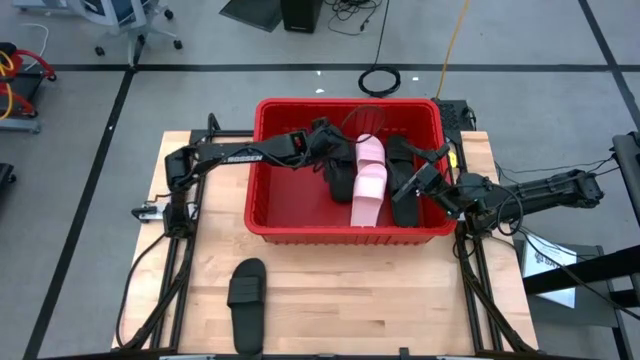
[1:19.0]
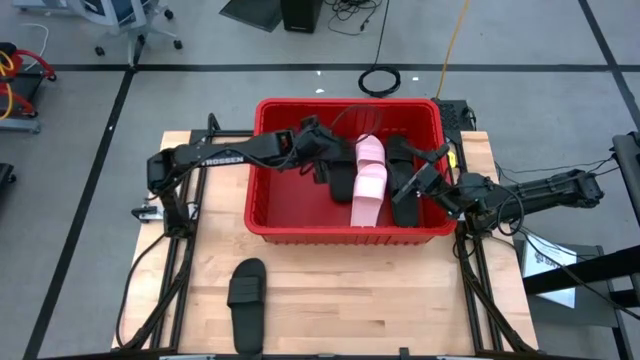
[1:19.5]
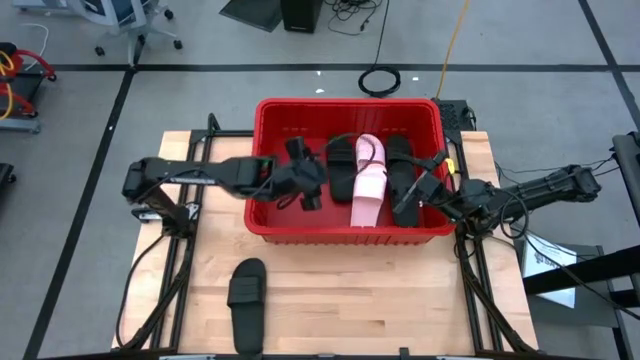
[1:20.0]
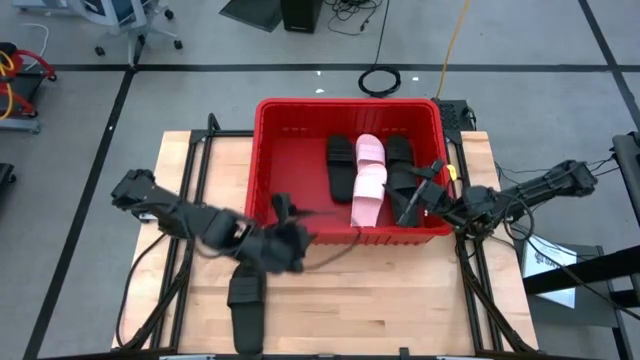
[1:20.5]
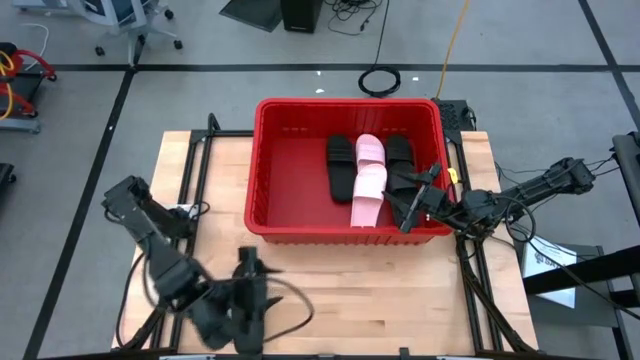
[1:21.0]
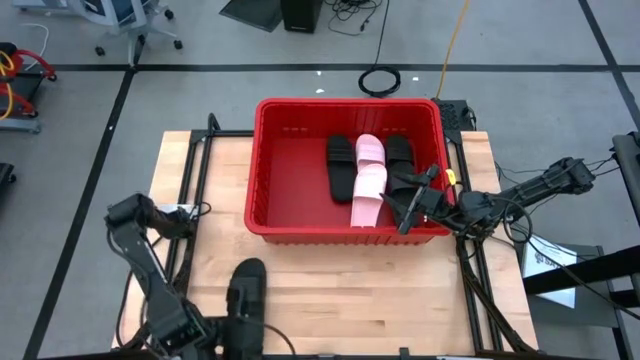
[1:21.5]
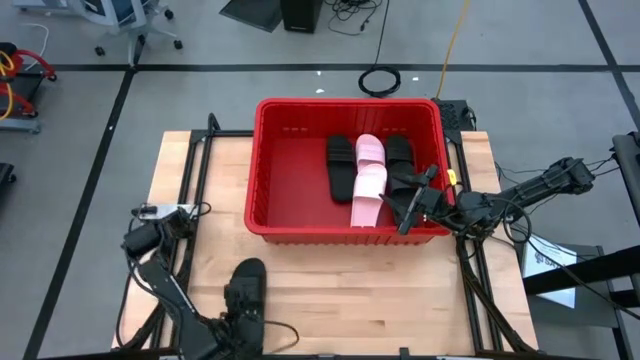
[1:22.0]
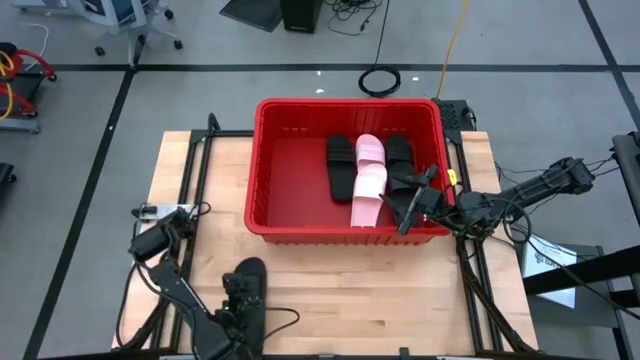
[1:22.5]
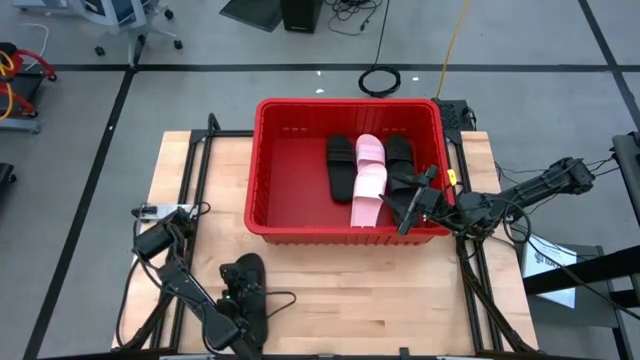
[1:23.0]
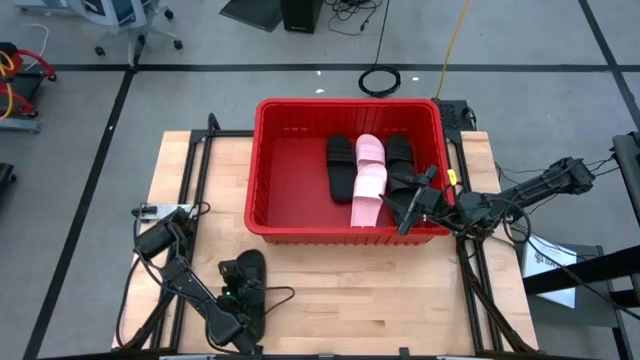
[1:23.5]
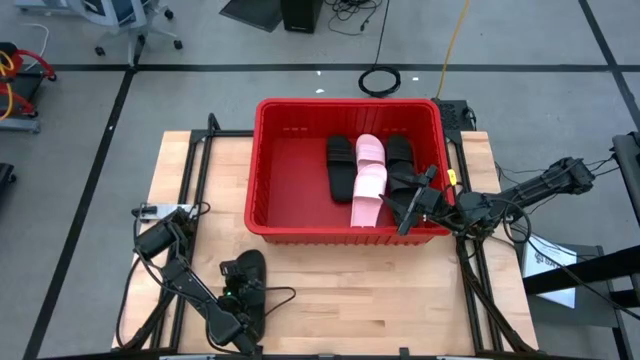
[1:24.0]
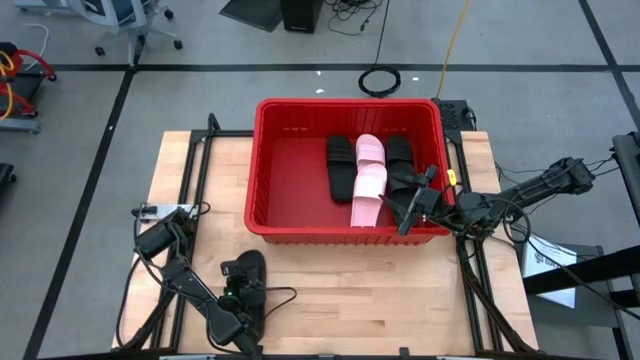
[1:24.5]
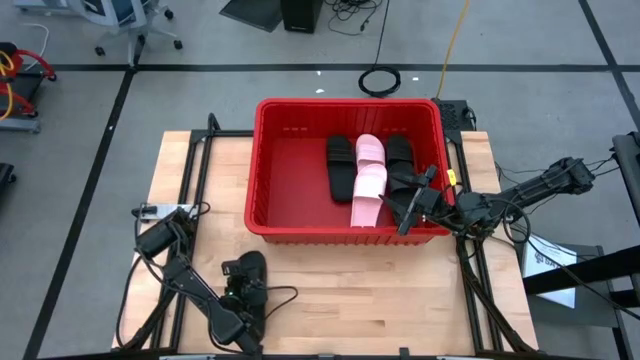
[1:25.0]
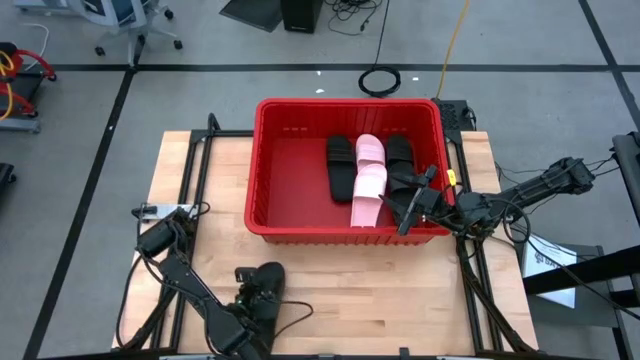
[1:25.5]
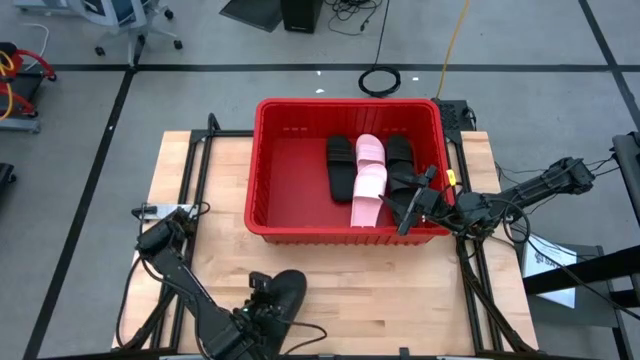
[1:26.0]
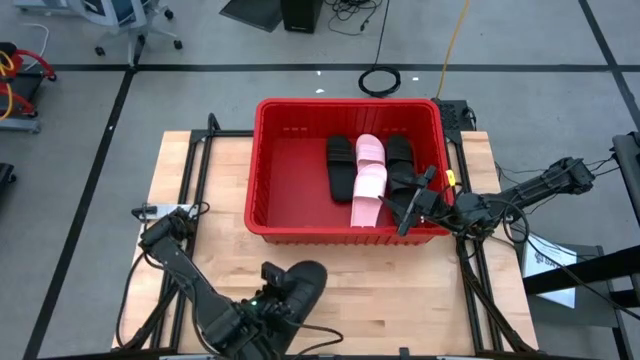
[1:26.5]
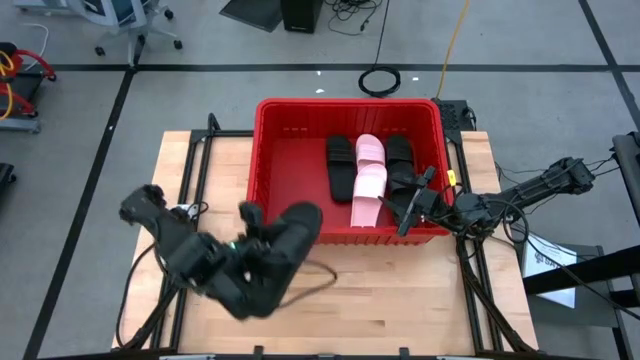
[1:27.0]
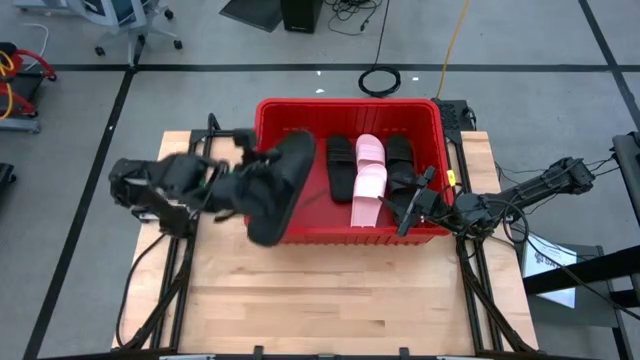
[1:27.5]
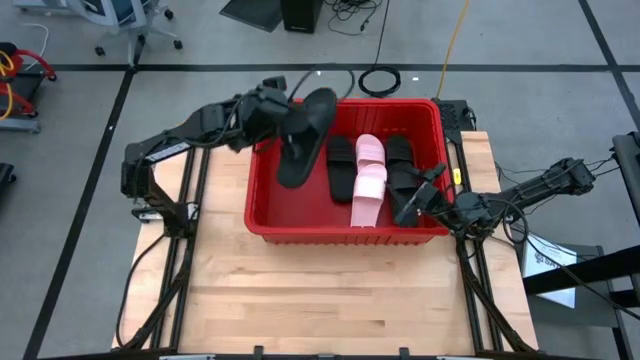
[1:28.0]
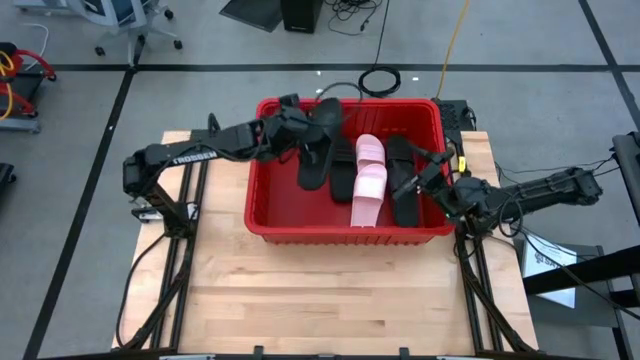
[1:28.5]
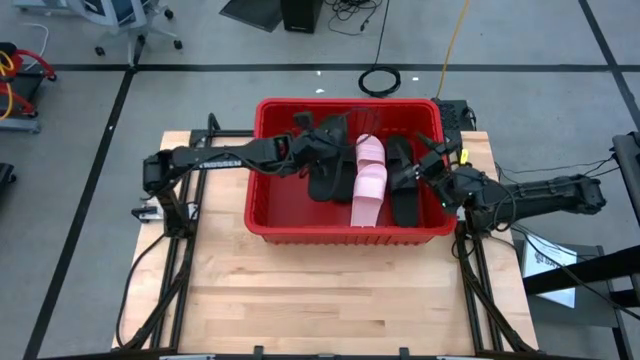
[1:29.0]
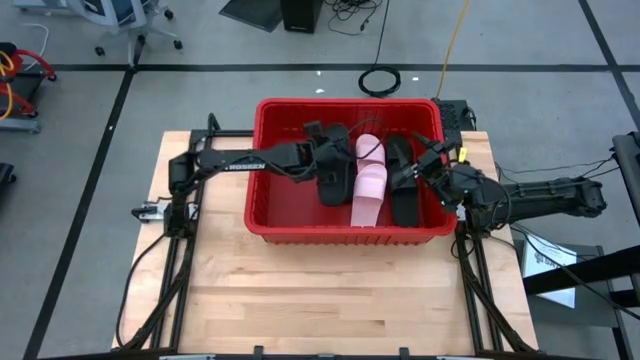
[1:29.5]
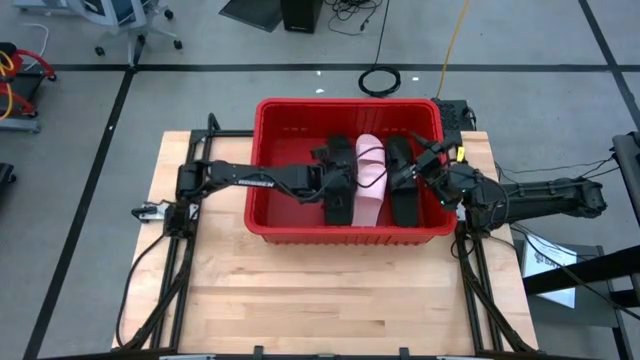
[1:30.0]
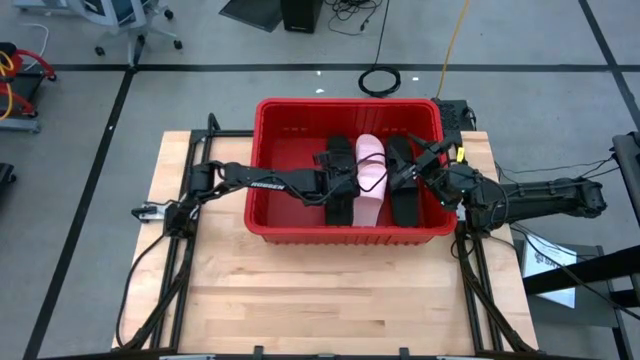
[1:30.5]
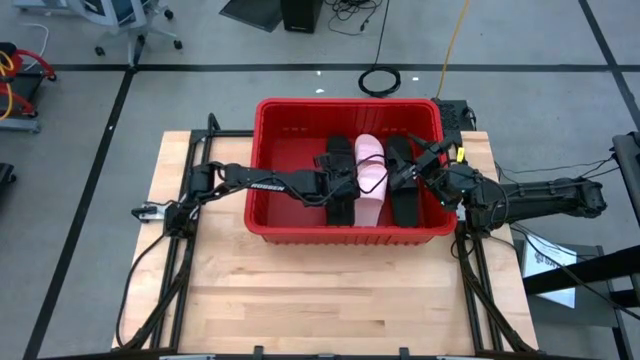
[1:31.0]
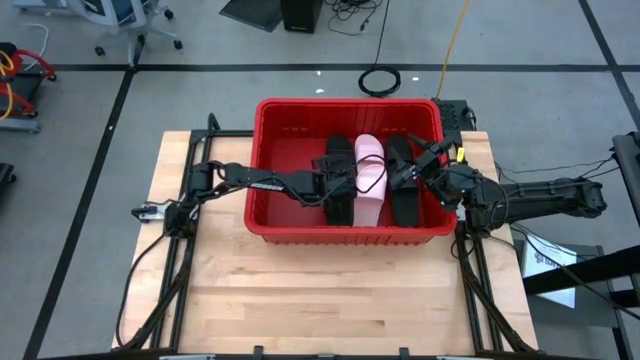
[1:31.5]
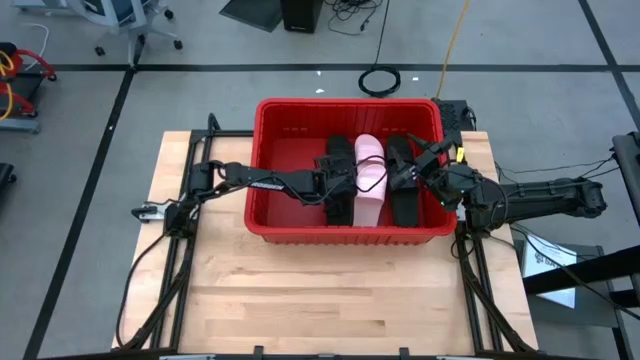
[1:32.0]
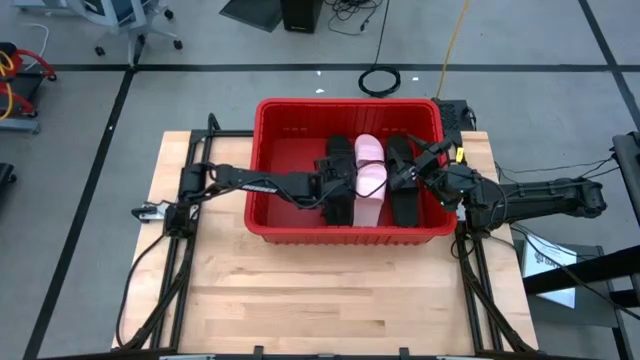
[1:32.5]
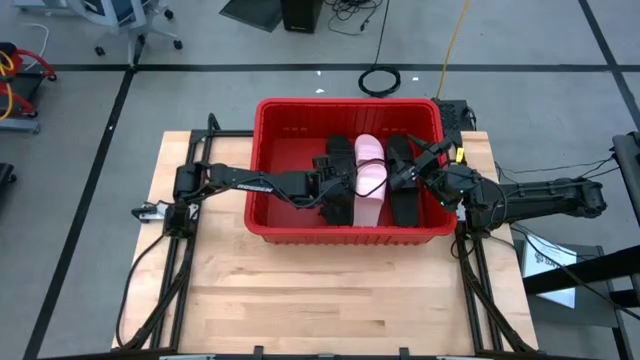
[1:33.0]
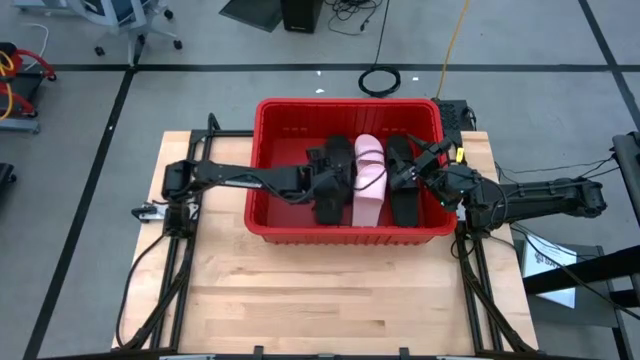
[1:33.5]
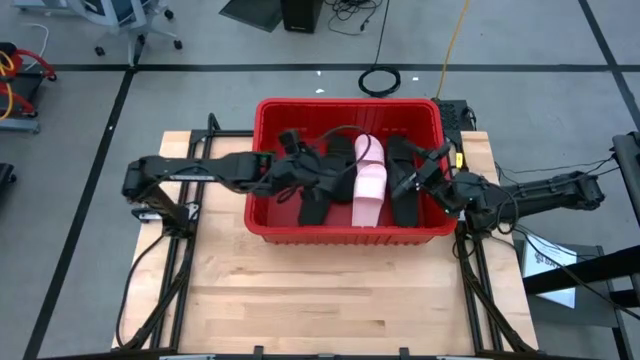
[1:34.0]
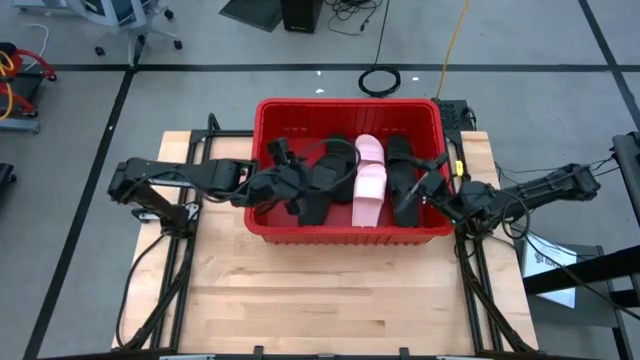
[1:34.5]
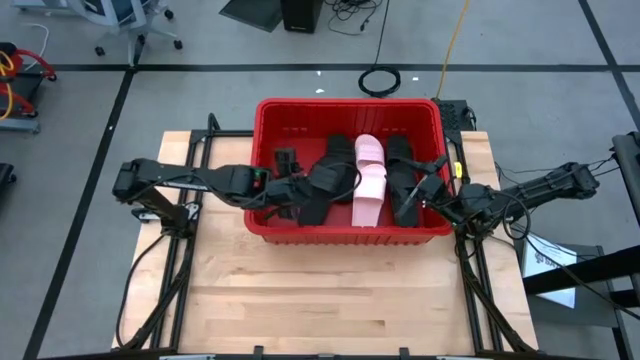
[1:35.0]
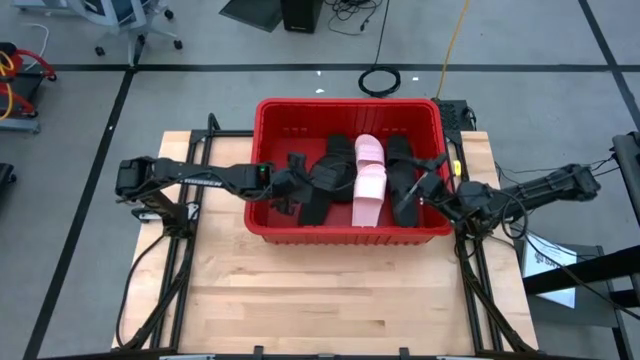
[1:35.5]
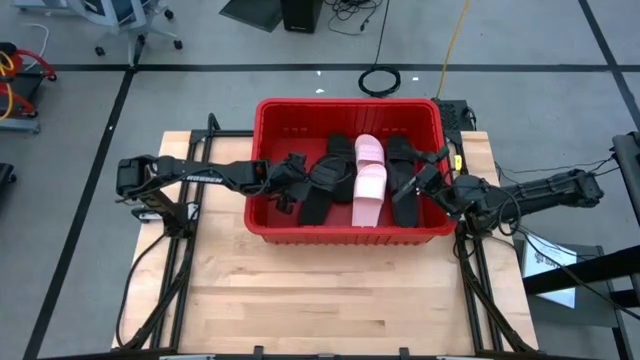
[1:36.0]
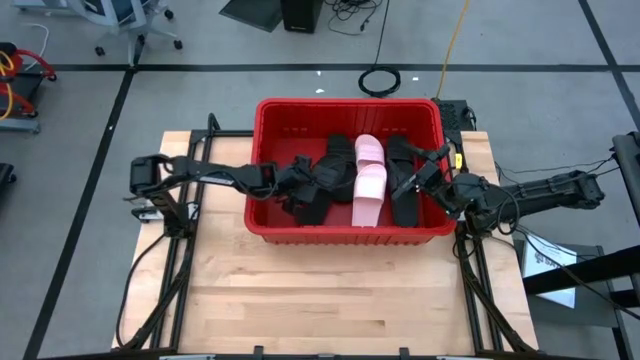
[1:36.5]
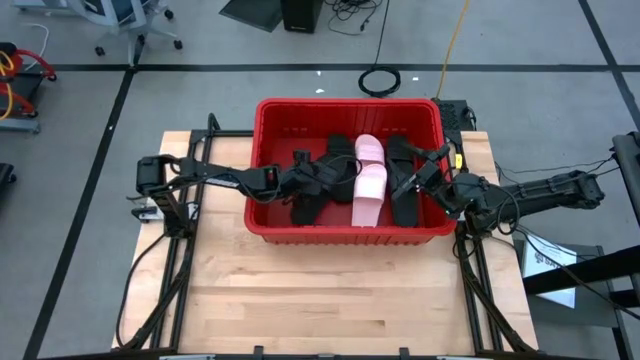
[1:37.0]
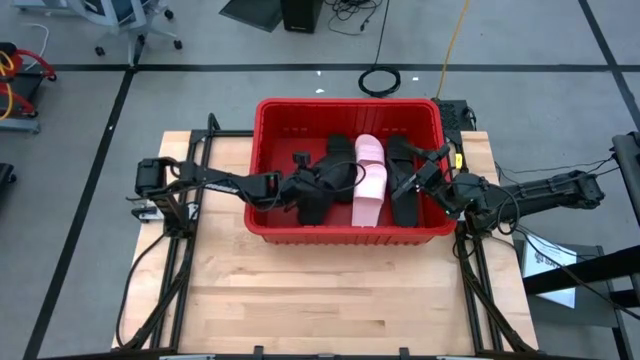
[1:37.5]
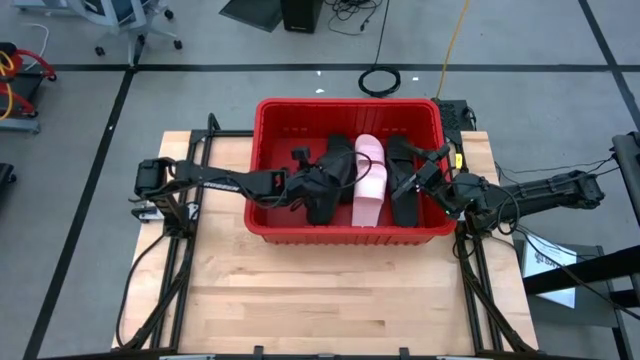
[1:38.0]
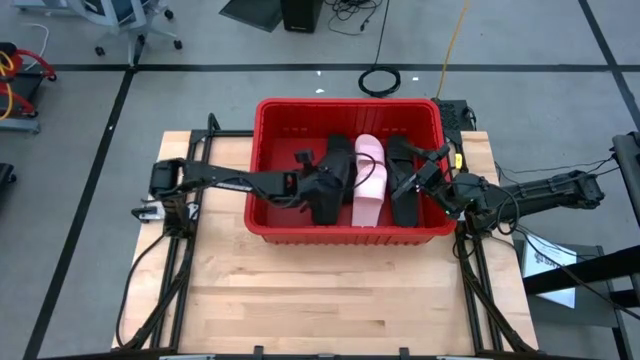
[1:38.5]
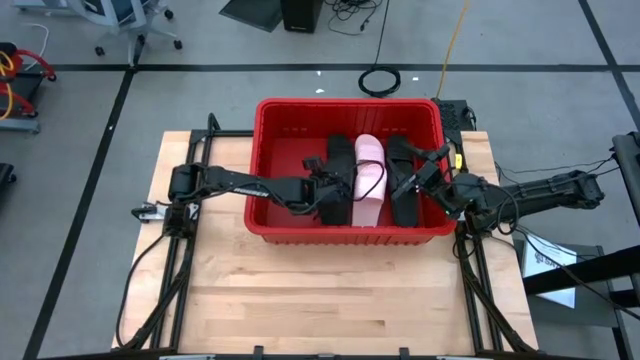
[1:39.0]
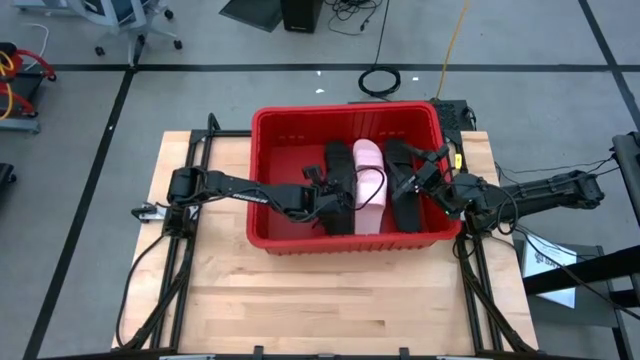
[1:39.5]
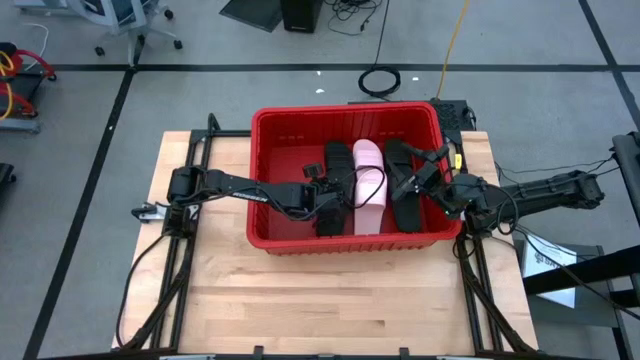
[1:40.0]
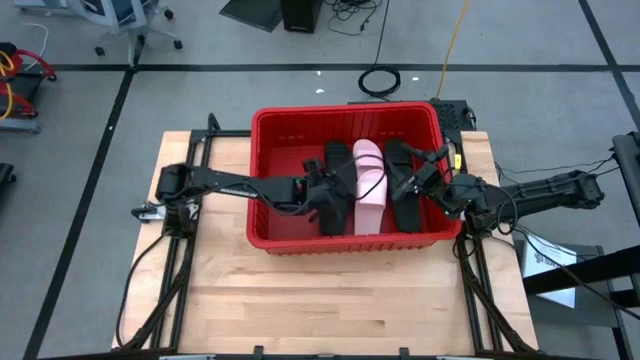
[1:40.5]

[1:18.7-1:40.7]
Task: Pick and place slides into bin
Put the black slipper into the red container
